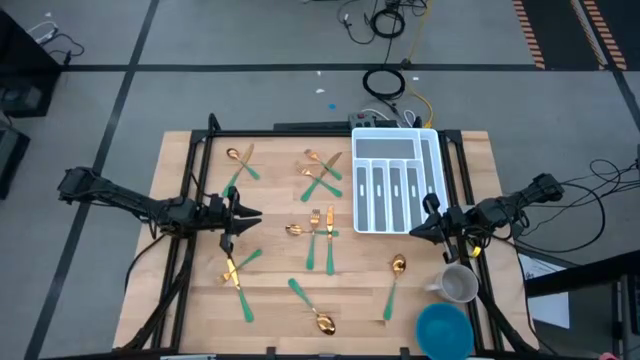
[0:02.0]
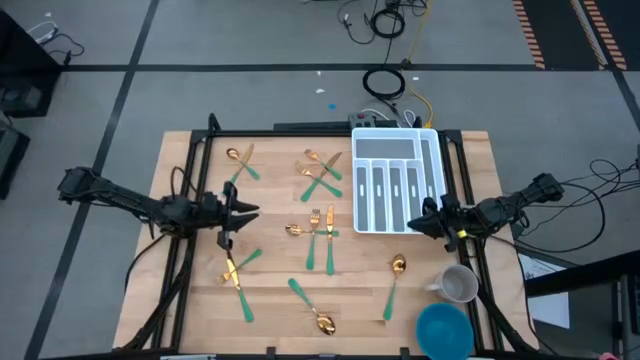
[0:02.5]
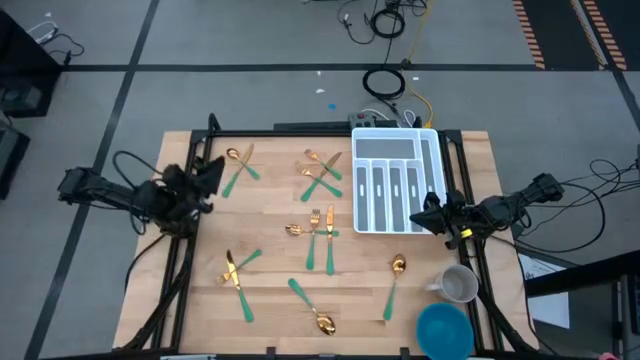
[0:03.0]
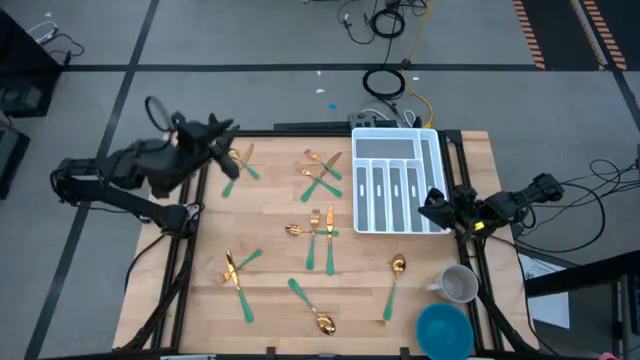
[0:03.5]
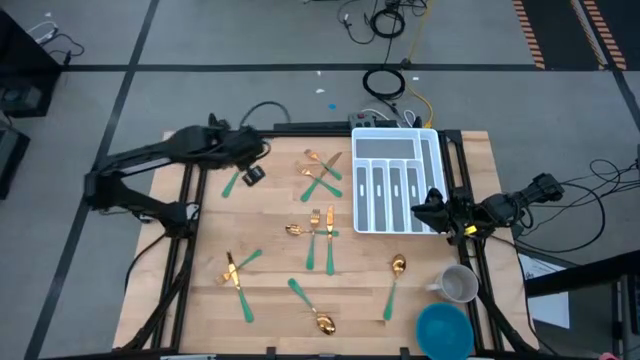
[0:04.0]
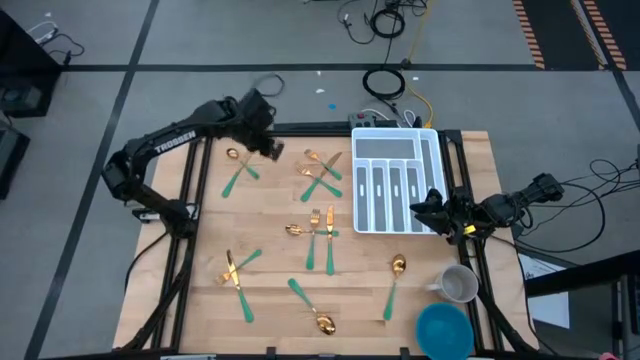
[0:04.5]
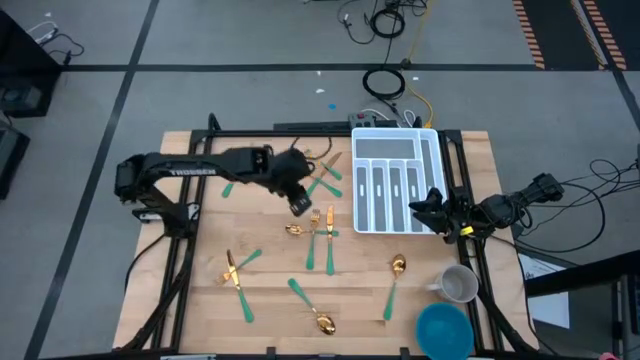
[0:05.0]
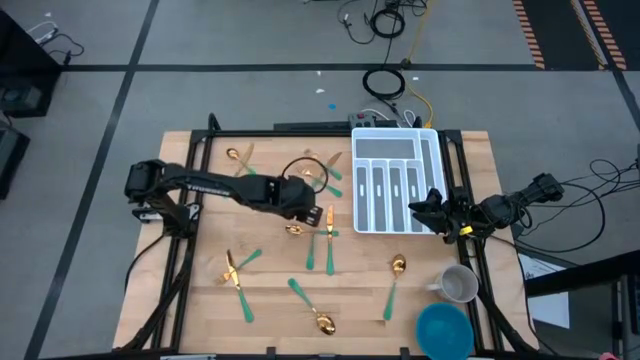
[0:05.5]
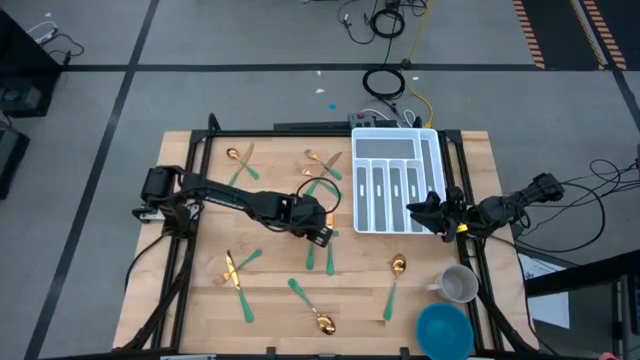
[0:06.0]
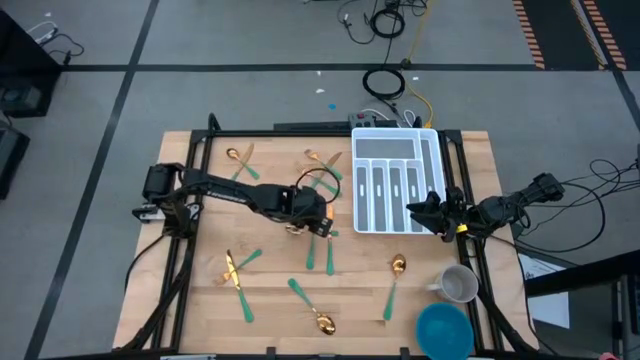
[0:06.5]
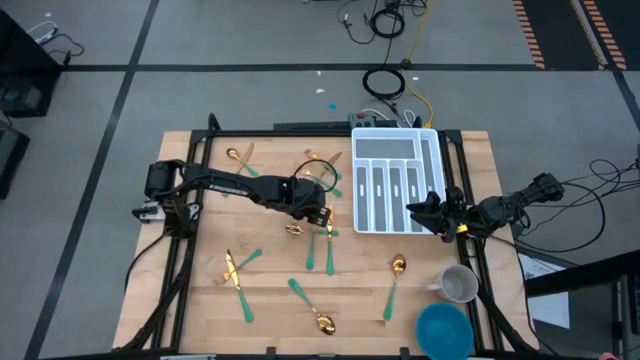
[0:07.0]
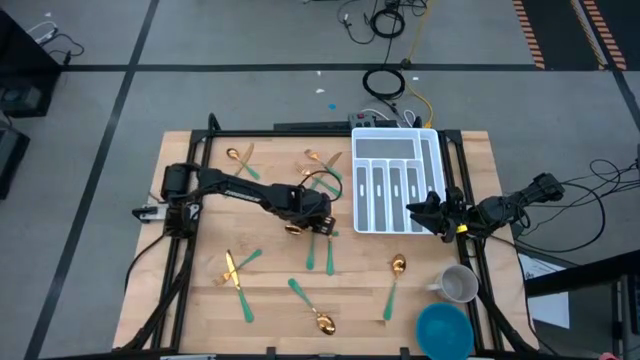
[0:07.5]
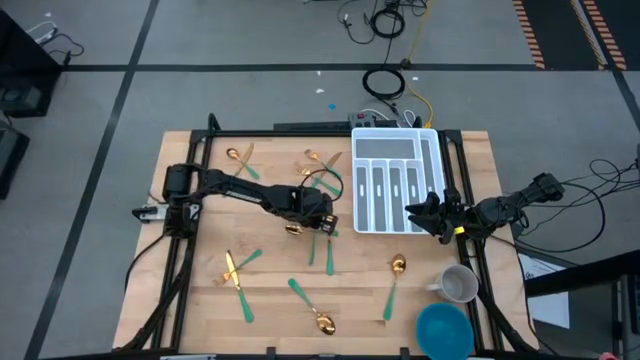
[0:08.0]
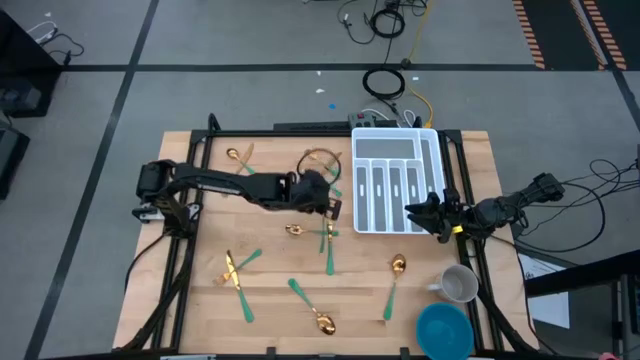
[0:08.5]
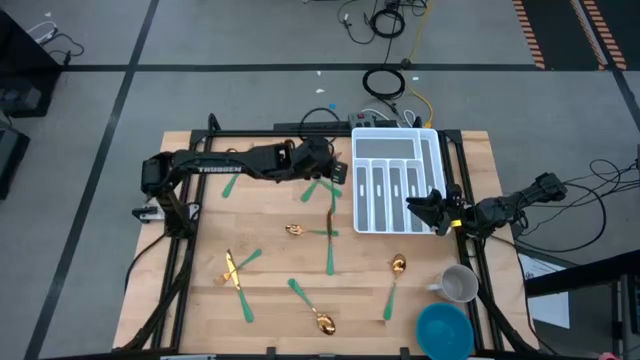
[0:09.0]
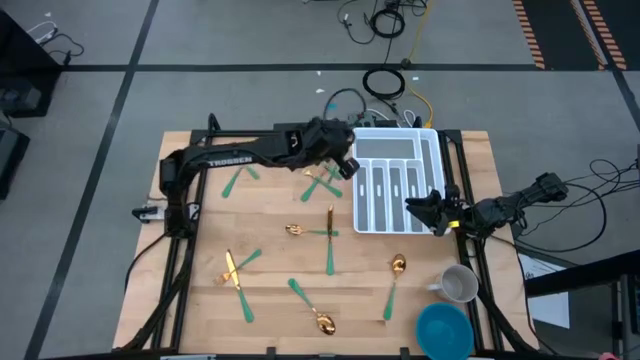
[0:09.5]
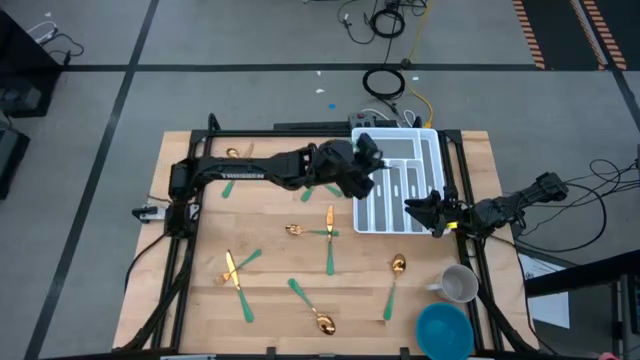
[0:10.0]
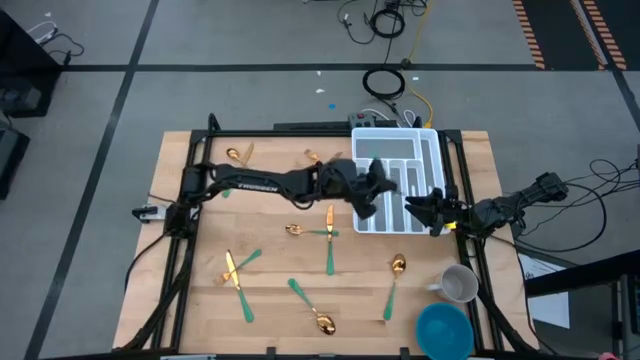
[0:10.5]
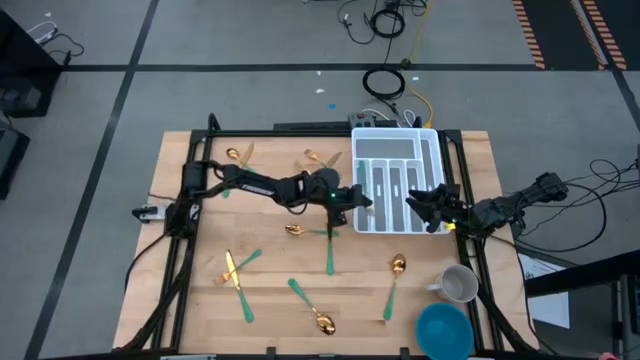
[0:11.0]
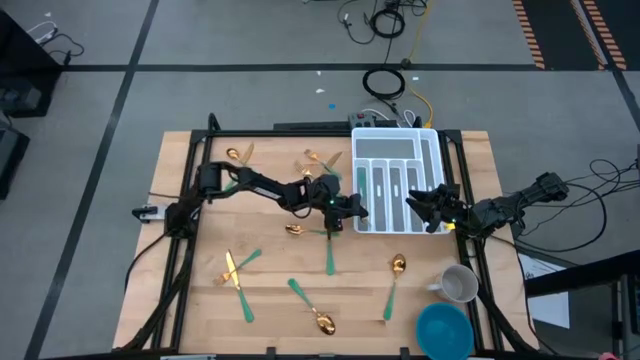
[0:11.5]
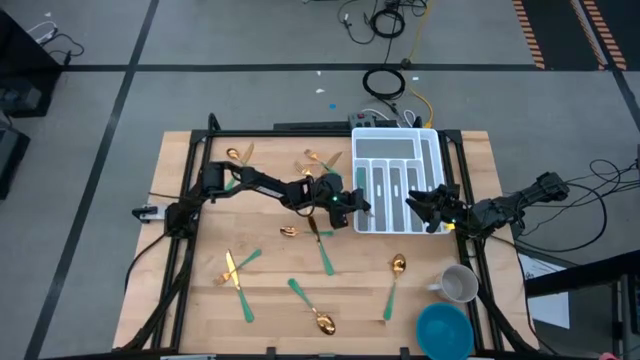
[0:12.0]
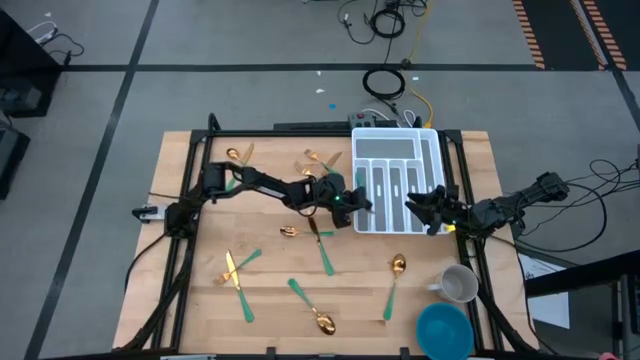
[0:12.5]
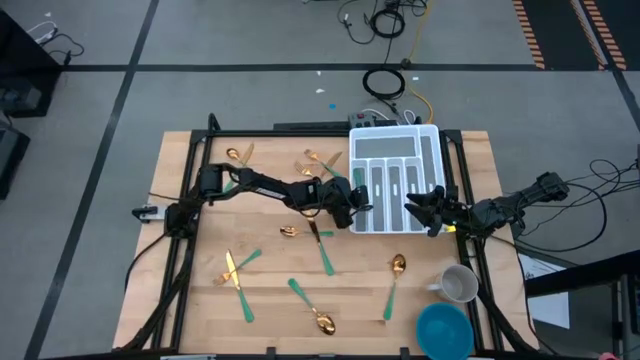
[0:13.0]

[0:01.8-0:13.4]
Task: Sort silverware
Put the fork into the silverware tray

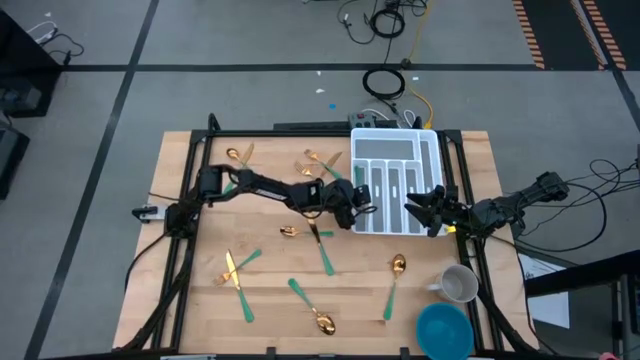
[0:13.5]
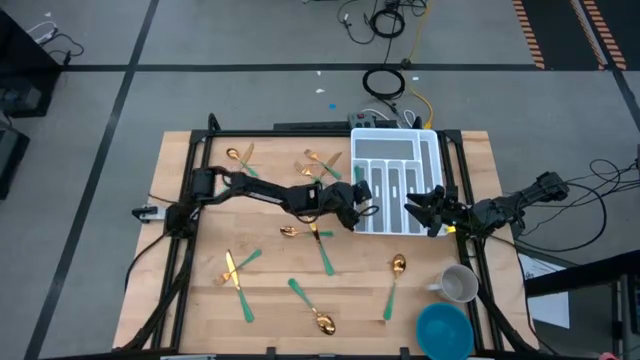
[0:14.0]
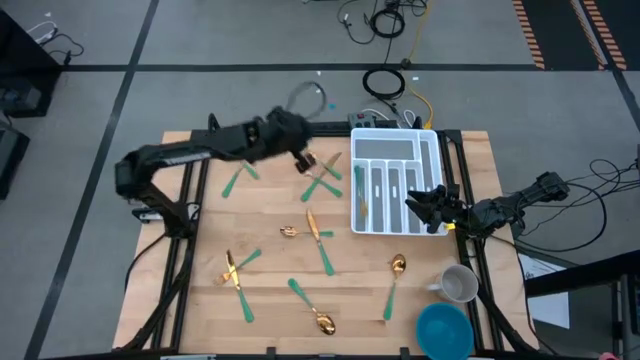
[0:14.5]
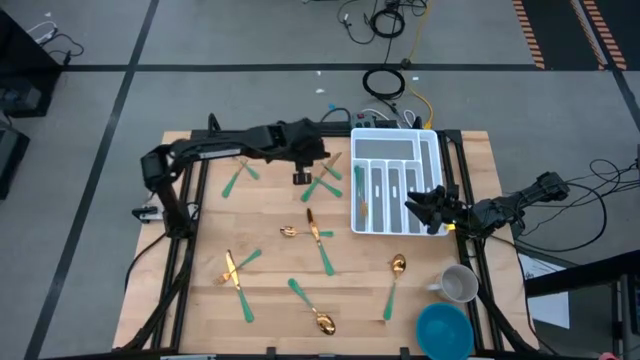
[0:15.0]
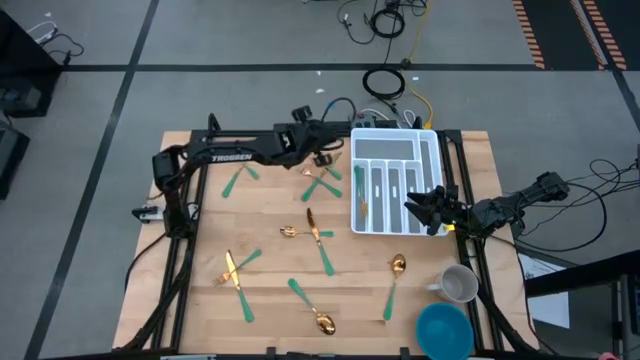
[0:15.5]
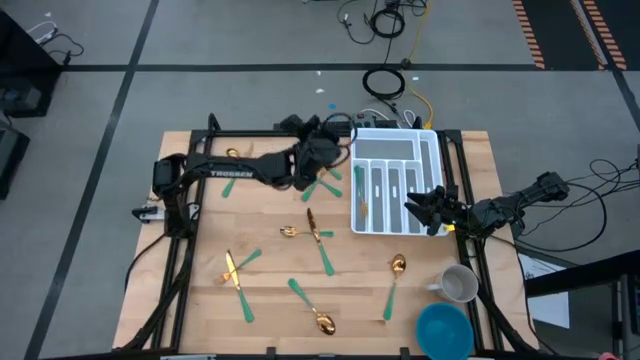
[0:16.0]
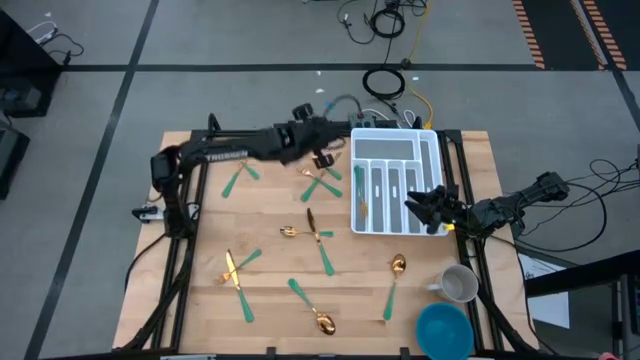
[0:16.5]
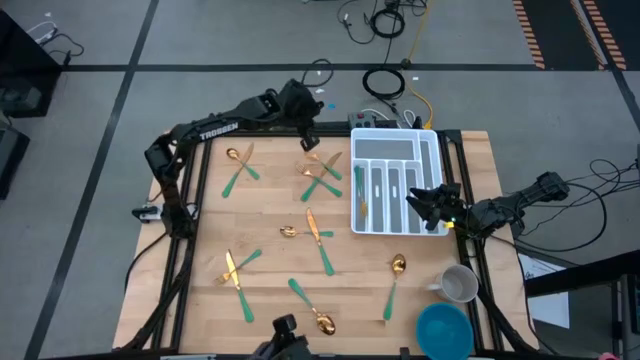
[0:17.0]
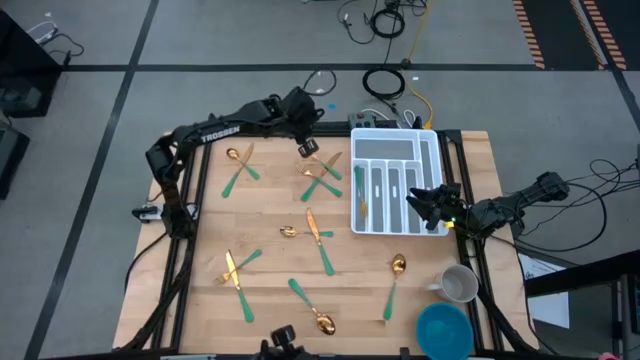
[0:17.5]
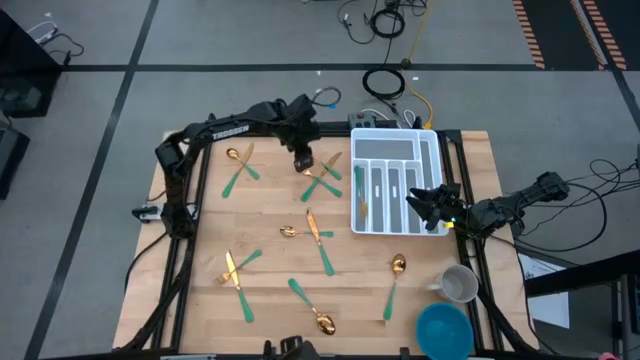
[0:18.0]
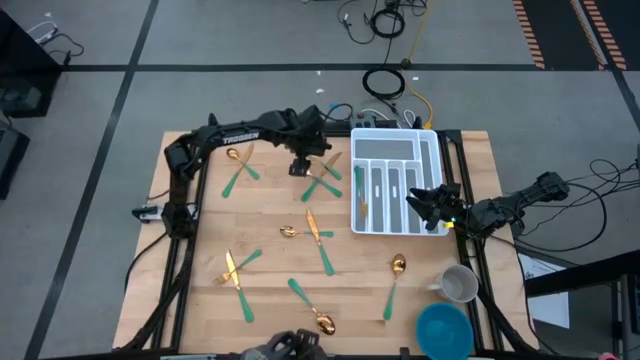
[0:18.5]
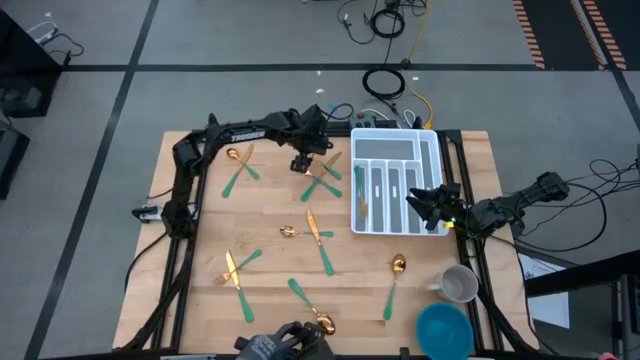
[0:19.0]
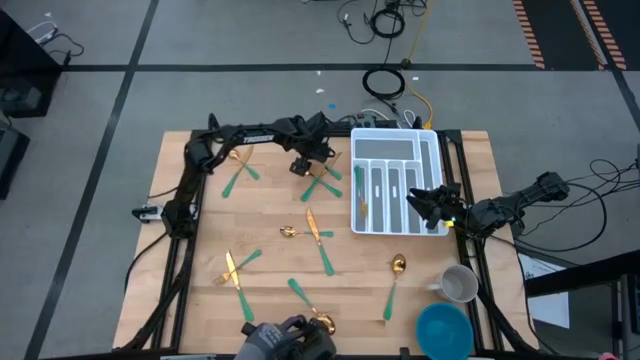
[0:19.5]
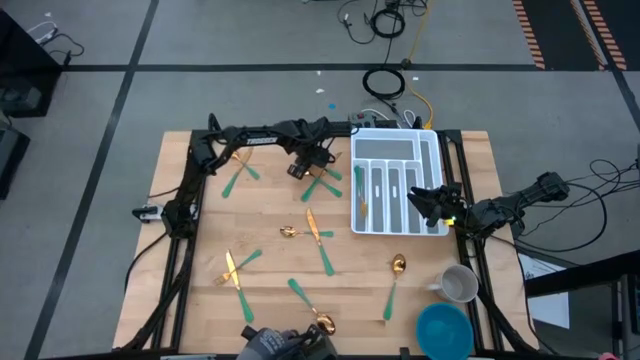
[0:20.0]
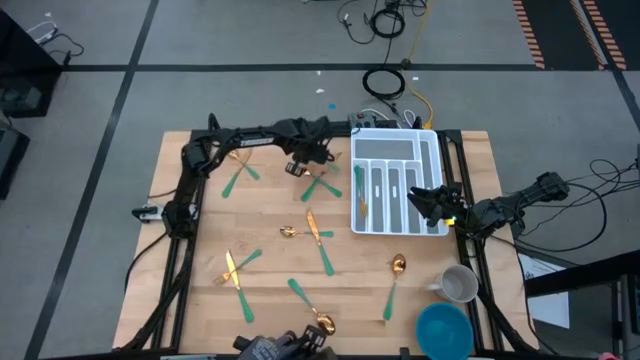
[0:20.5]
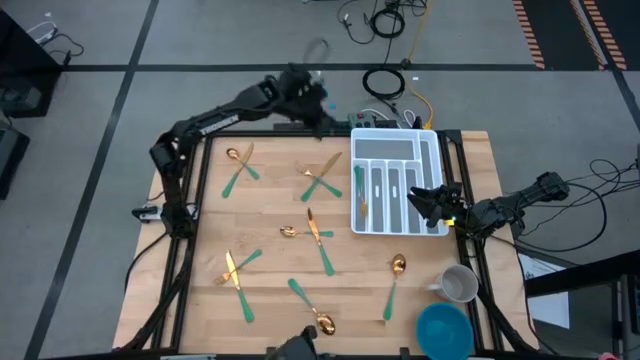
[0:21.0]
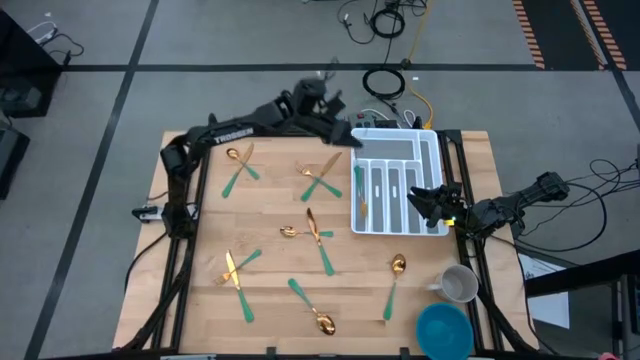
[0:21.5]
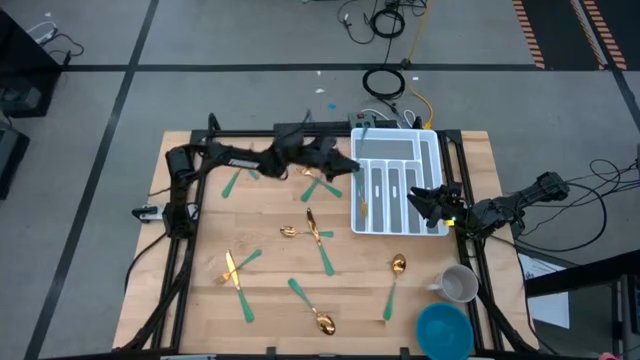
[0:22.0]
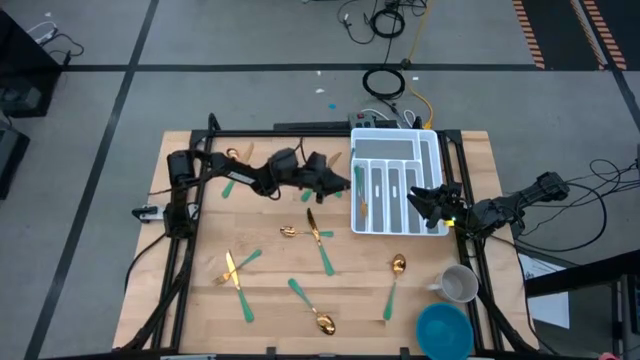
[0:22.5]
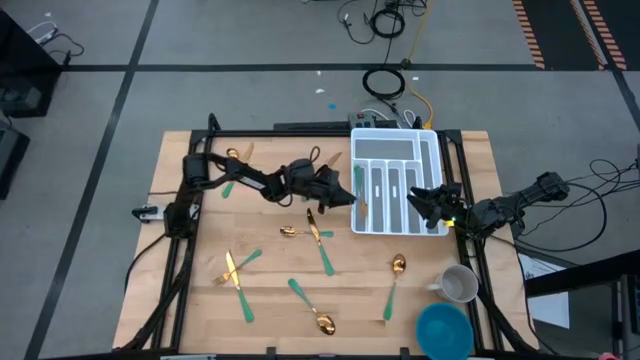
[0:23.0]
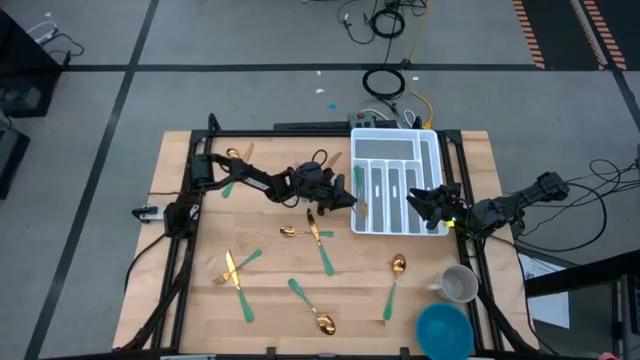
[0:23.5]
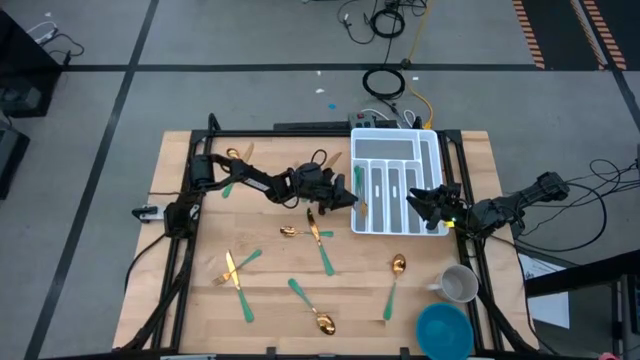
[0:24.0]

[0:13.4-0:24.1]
Put the fork into the silverware tray
